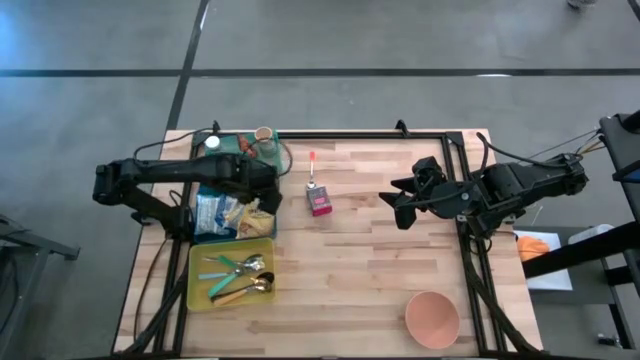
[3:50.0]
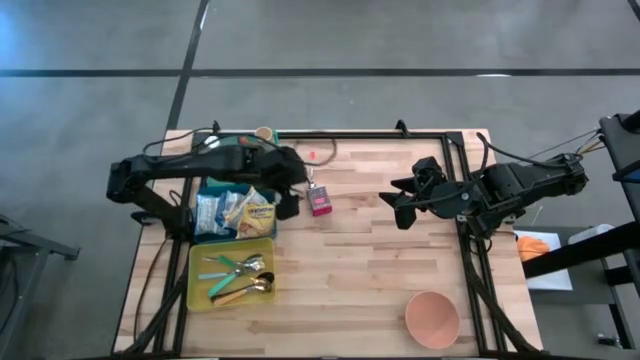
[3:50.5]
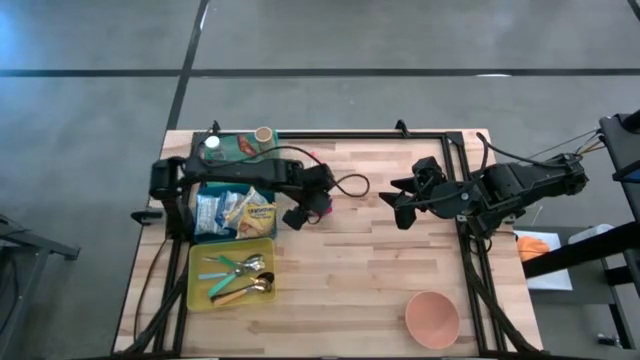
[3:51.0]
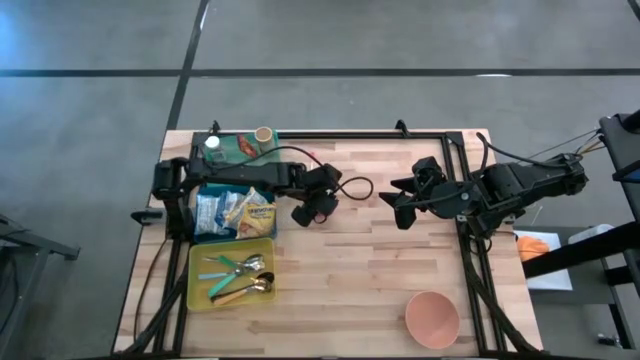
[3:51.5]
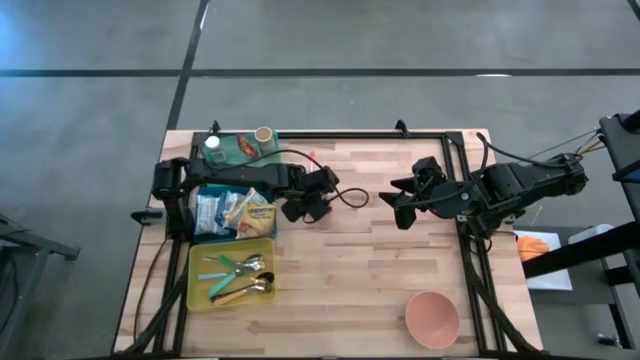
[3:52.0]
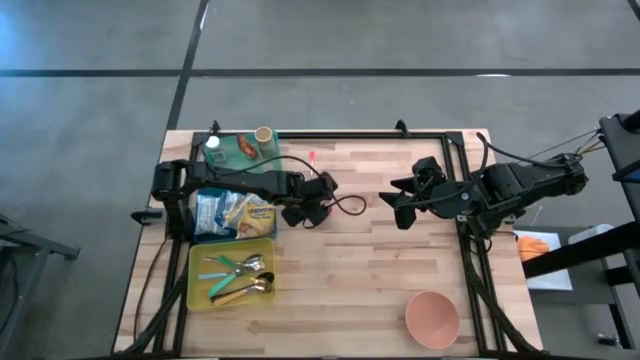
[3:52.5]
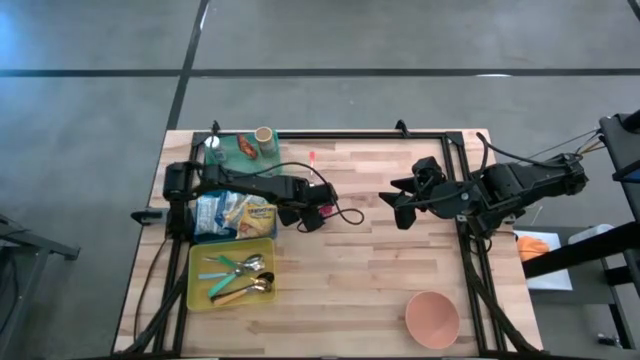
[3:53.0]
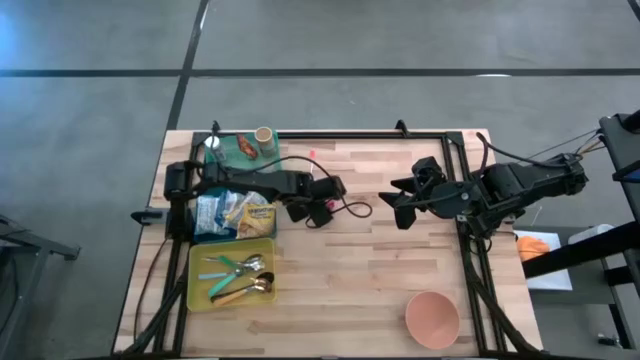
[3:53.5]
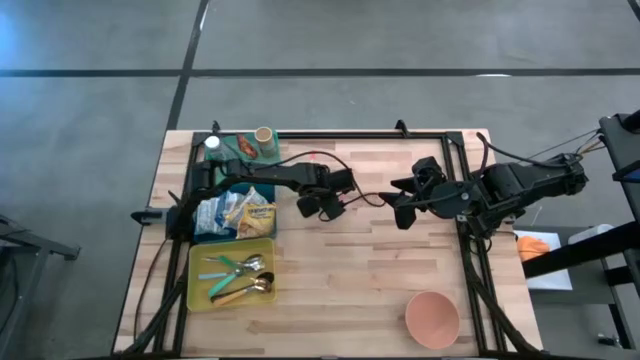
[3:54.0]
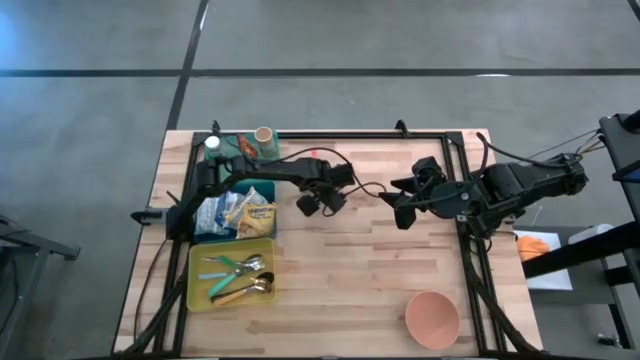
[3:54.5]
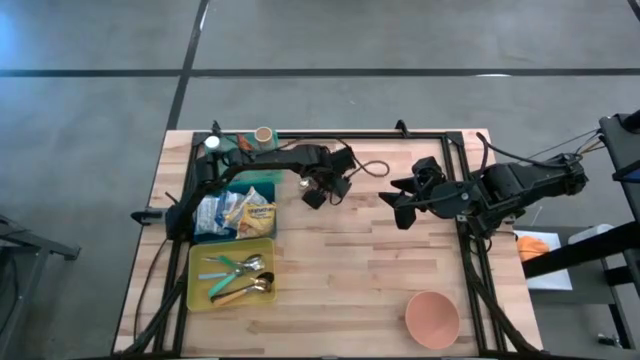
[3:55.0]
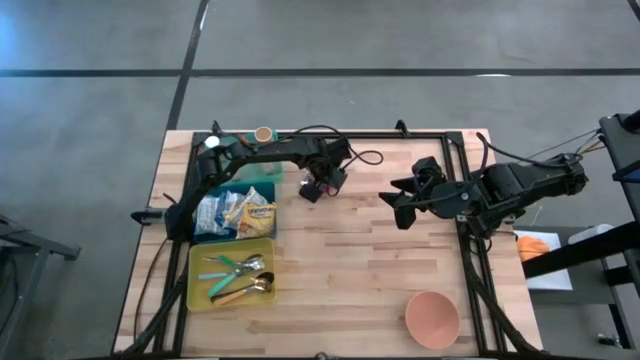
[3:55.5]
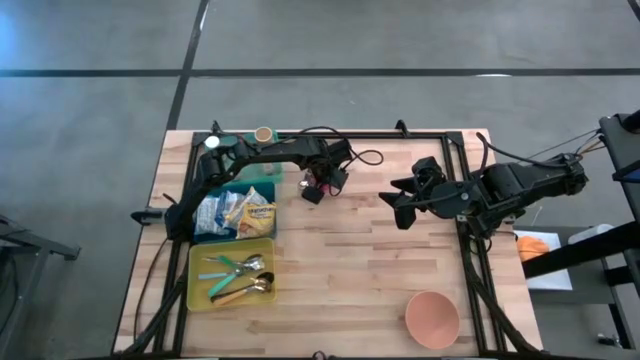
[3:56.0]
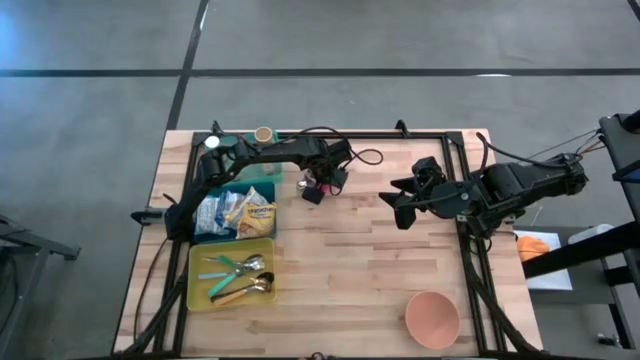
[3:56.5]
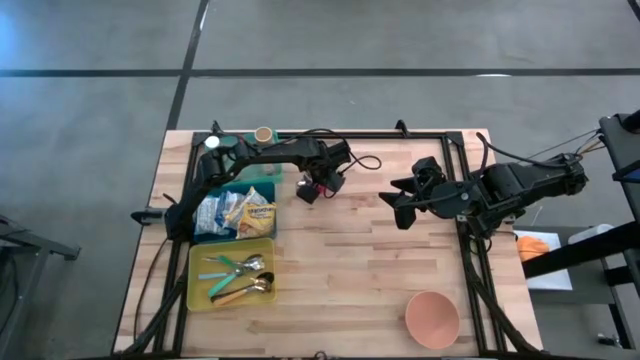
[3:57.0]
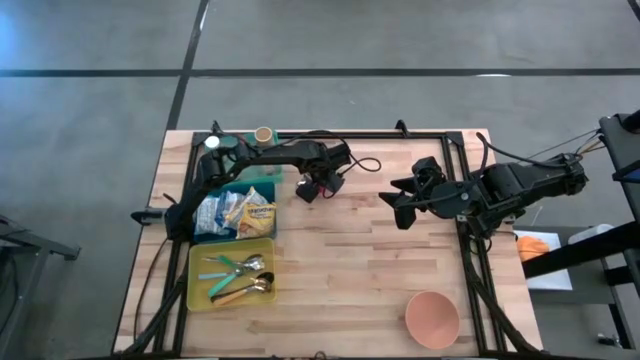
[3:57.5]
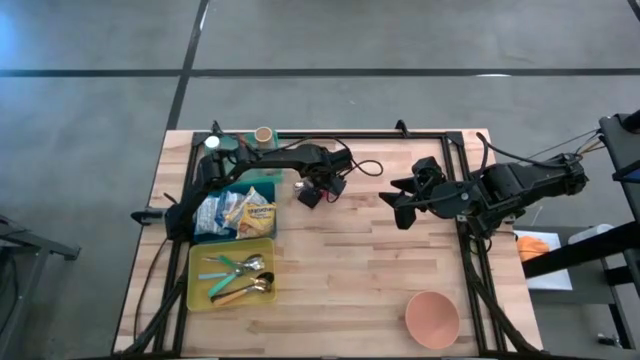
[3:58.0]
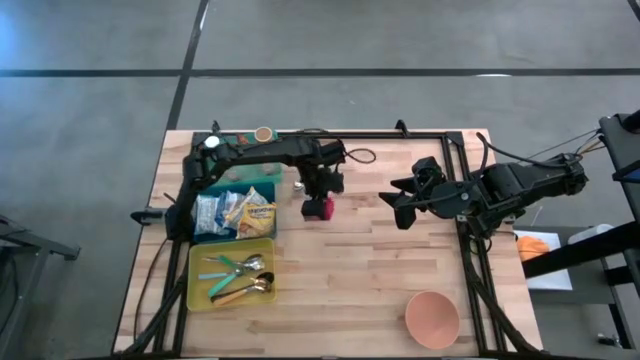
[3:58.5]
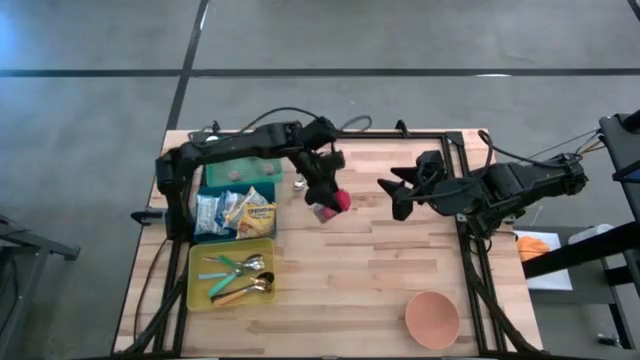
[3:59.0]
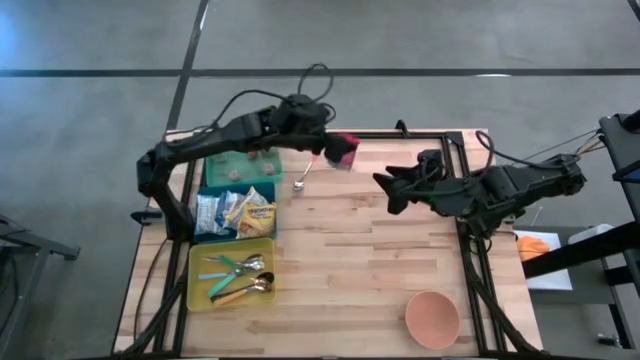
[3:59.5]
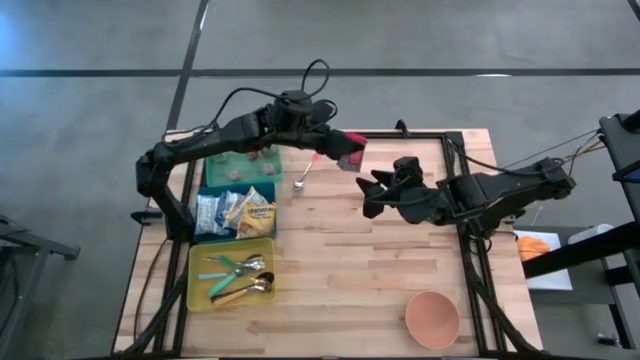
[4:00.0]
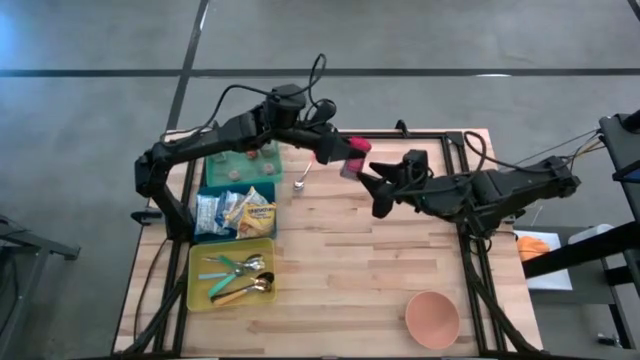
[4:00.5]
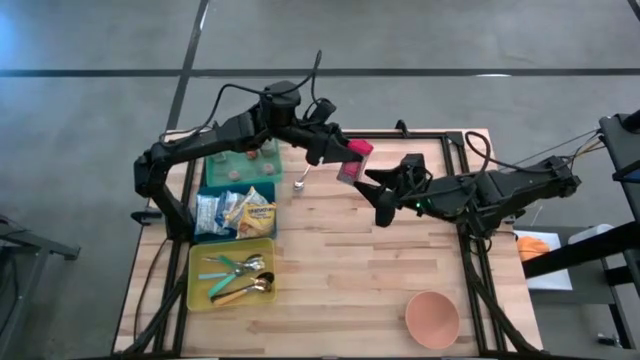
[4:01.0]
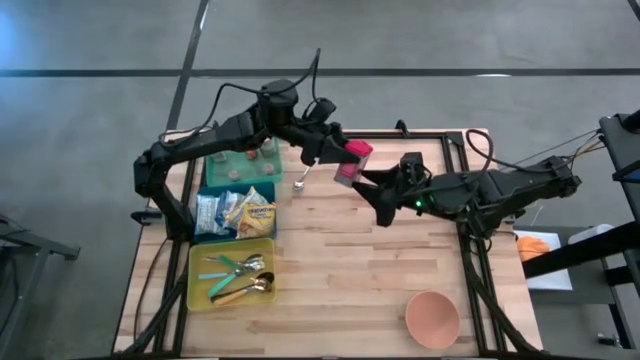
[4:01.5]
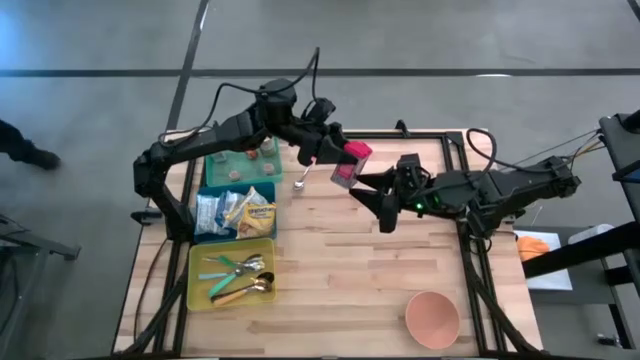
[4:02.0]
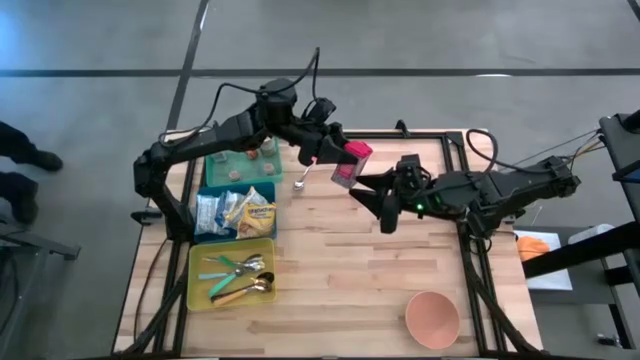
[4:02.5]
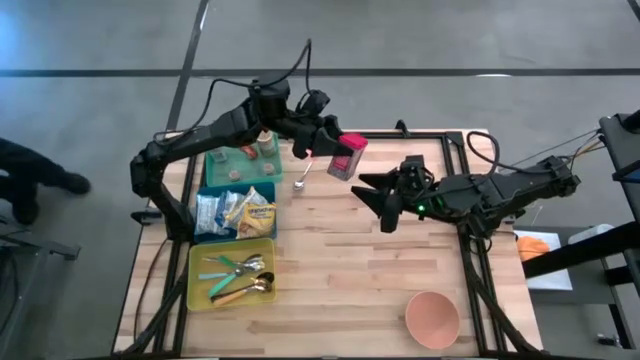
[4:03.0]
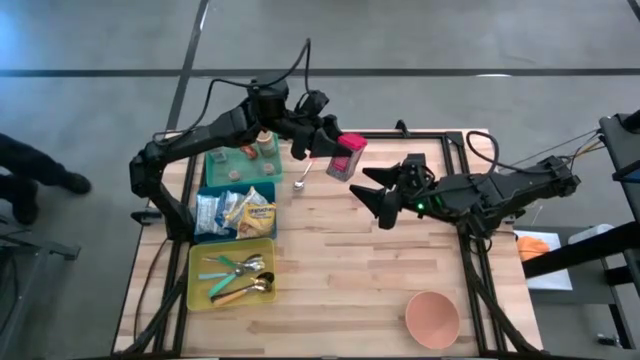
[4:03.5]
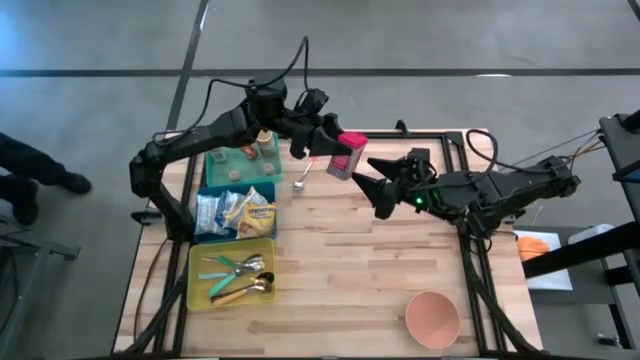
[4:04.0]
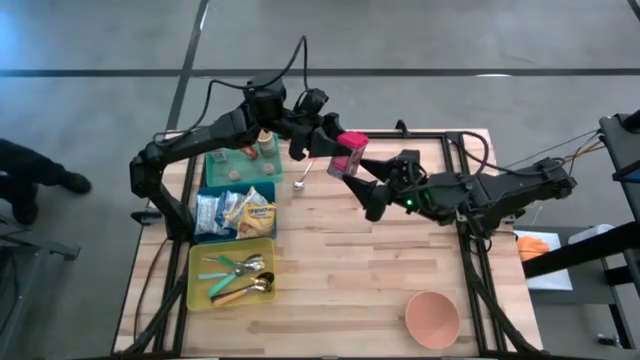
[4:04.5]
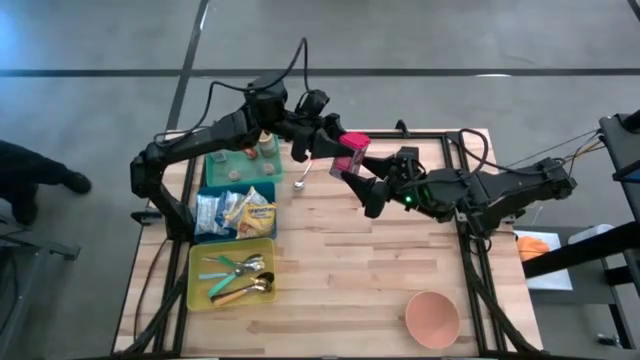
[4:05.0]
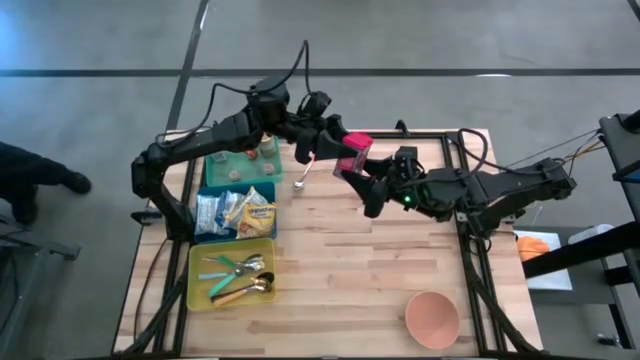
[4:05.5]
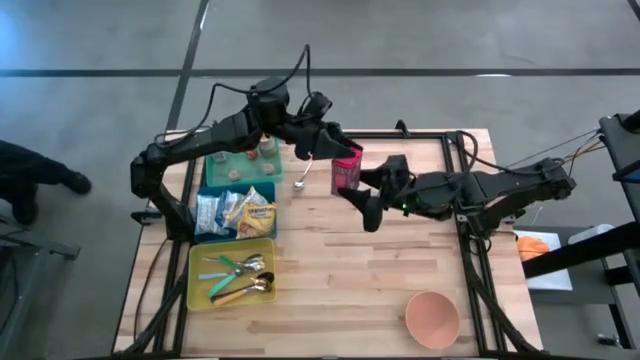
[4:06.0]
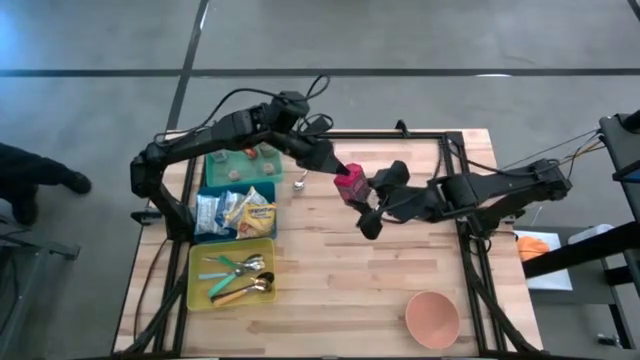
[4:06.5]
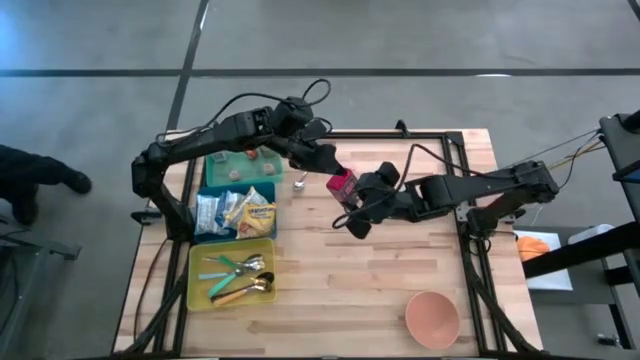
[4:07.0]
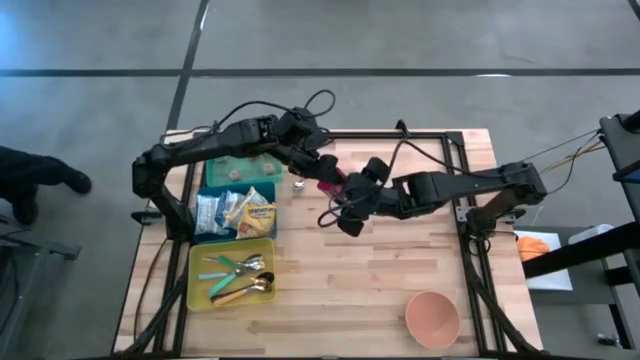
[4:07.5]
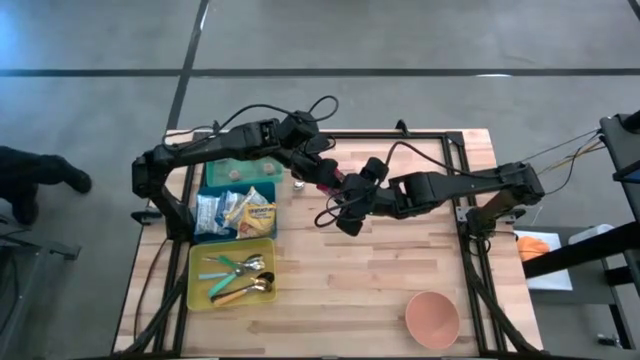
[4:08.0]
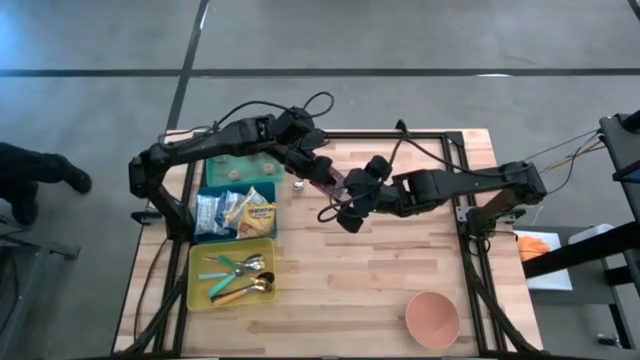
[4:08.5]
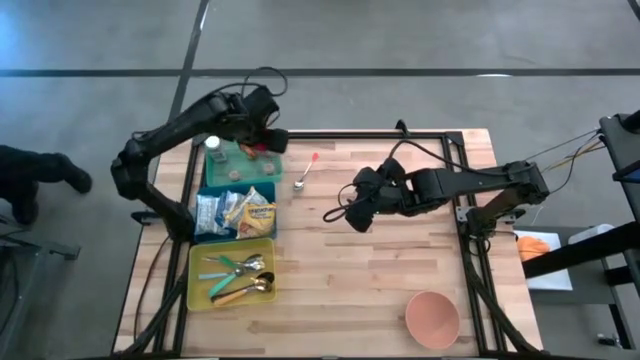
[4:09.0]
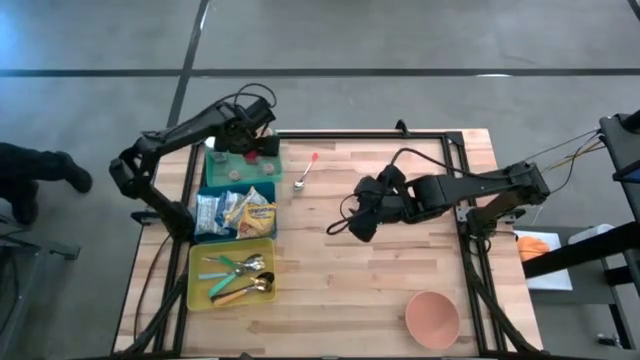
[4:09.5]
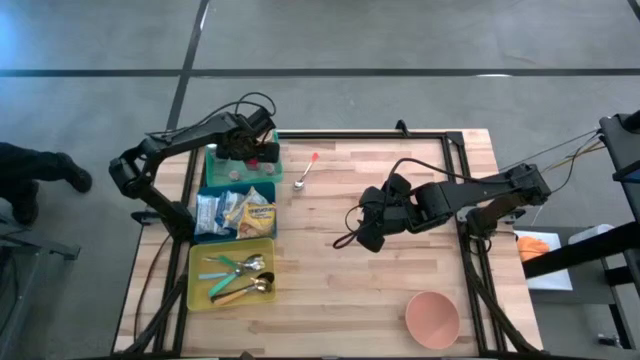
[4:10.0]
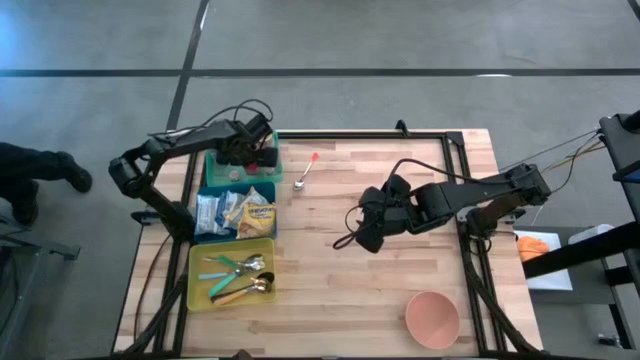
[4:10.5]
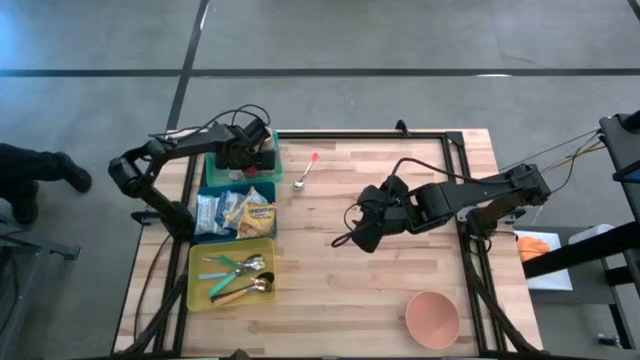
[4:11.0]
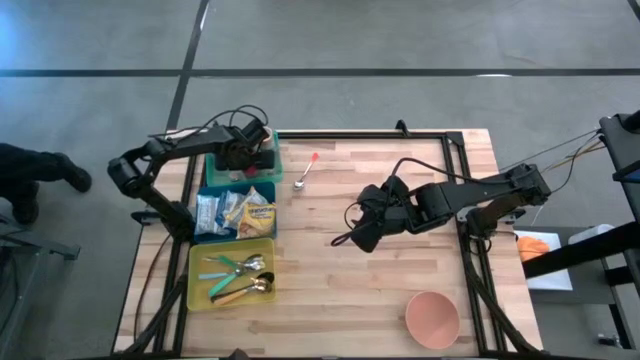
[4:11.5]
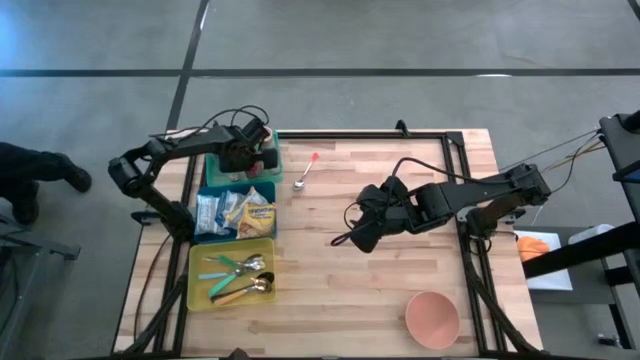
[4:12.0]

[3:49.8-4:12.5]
Put the red seasoning can into the light blue bin
